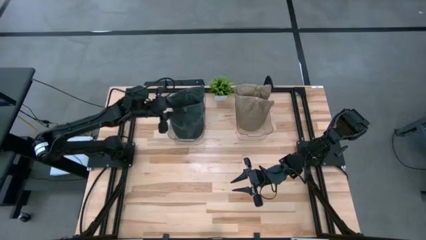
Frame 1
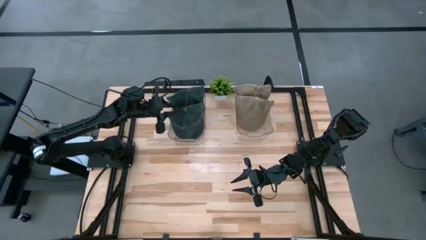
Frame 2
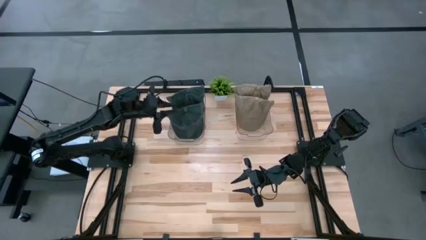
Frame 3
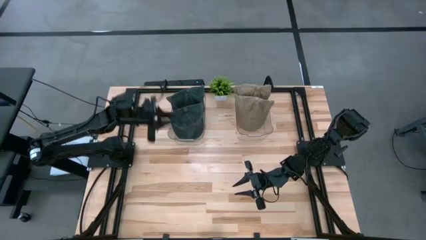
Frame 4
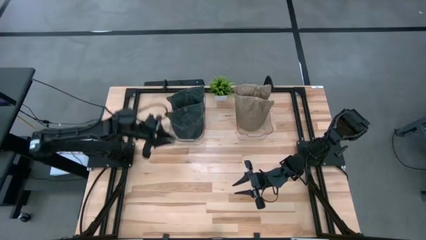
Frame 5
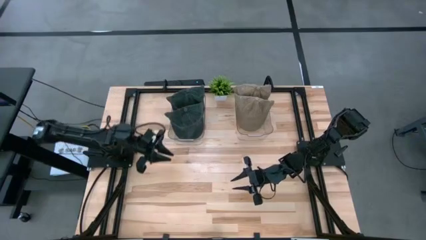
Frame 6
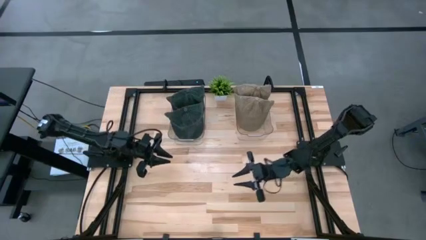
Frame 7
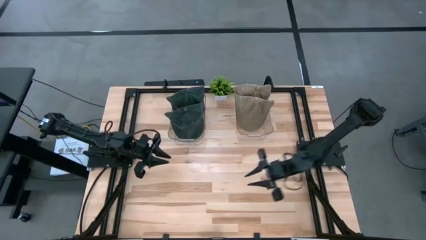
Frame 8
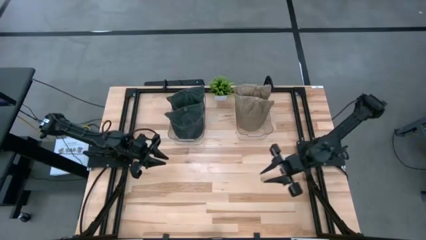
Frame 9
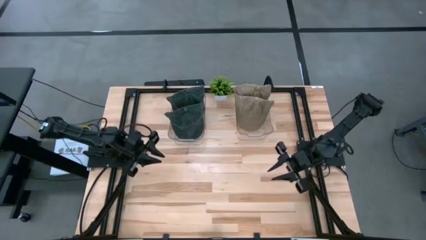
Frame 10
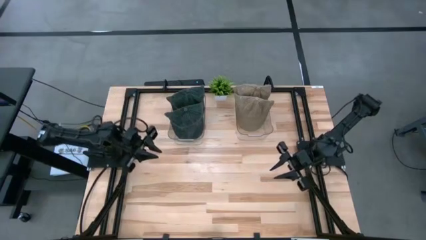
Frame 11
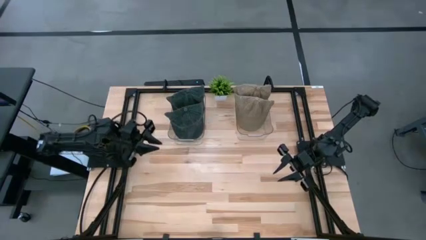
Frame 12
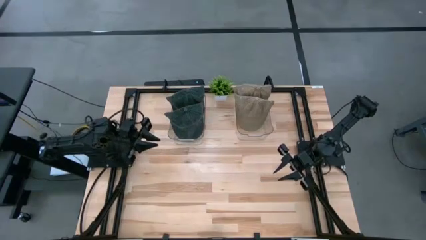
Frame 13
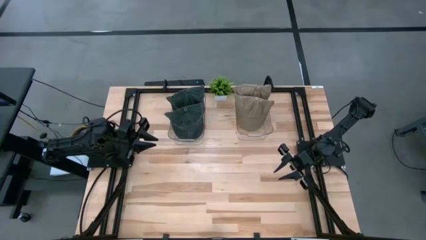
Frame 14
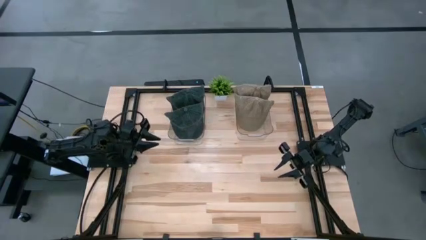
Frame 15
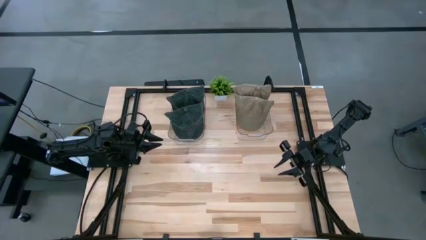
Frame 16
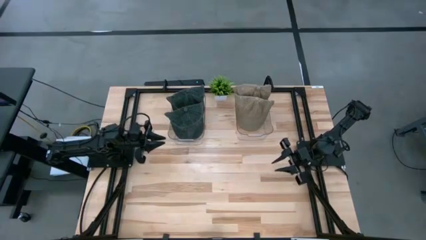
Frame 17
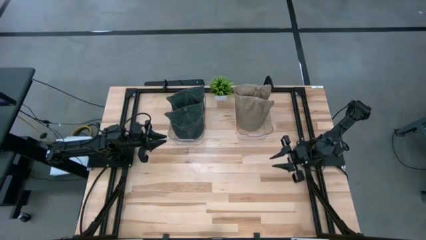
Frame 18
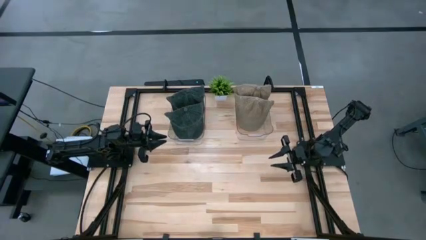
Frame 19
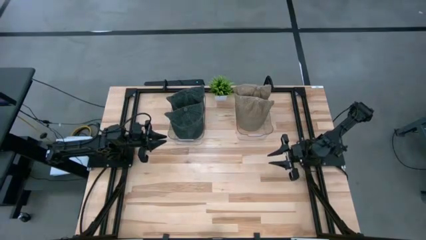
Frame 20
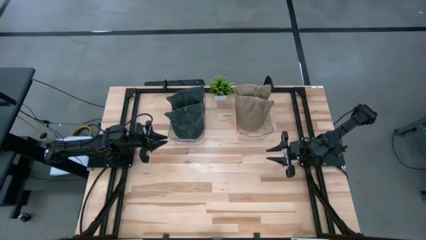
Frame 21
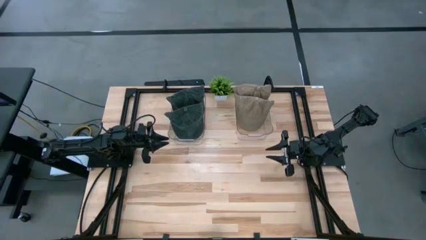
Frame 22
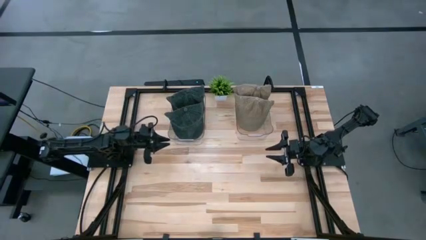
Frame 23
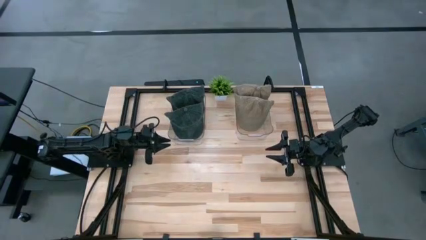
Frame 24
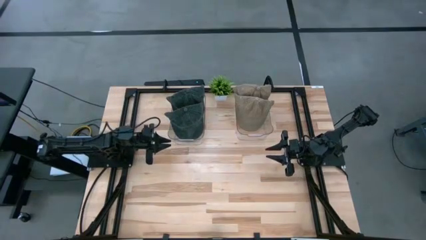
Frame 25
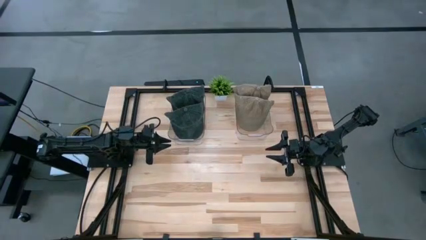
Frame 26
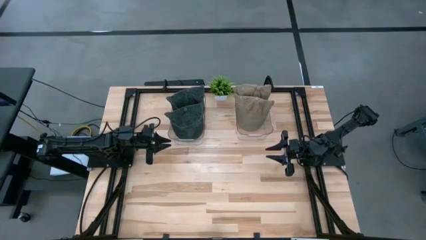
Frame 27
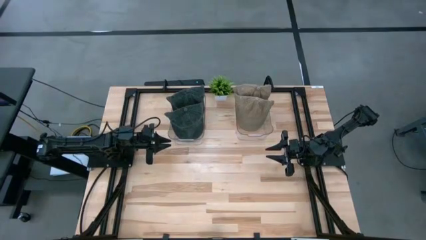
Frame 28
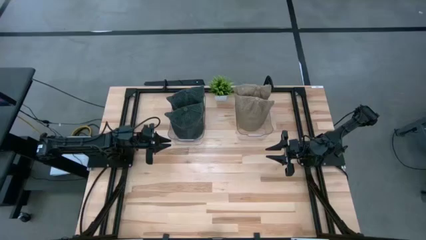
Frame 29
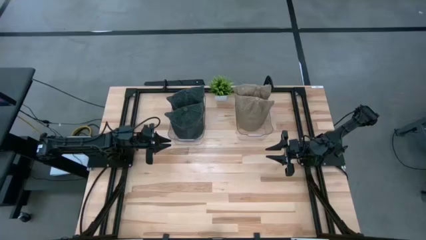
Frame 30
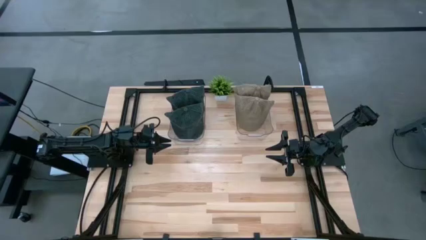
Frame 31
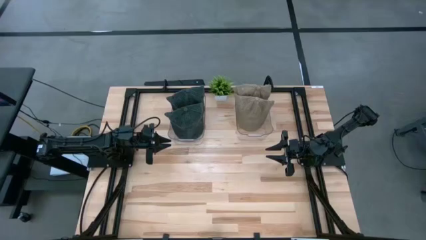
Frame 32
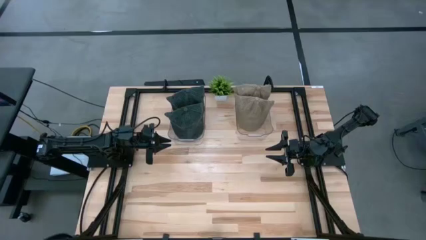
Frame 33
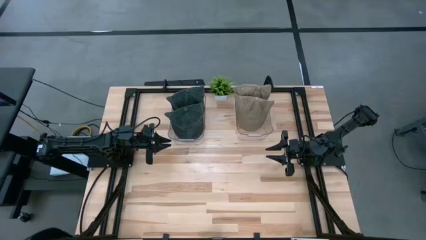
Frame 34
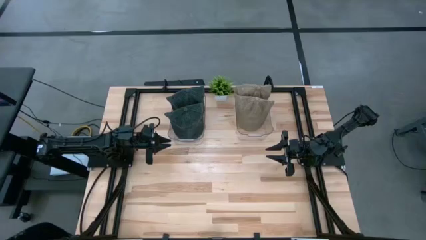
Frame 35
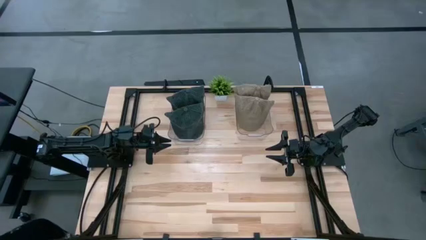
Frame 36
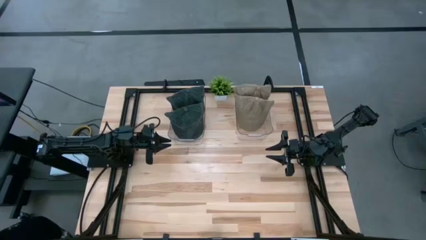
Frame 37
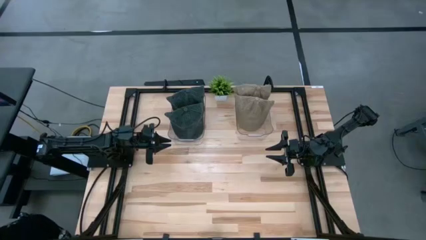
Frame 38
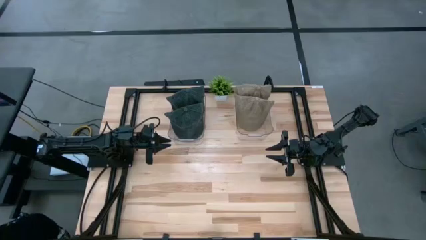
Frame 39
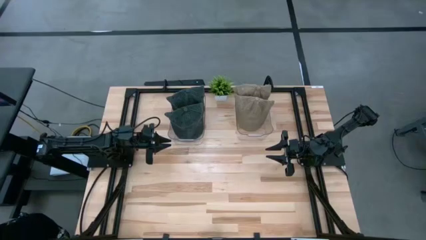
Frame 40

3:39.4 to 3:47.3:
Task: Pick & Place hat
Return to Home Position

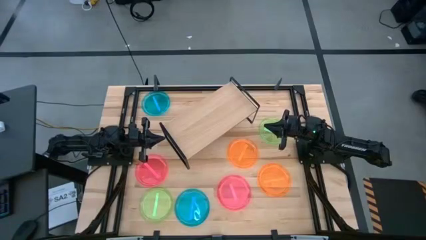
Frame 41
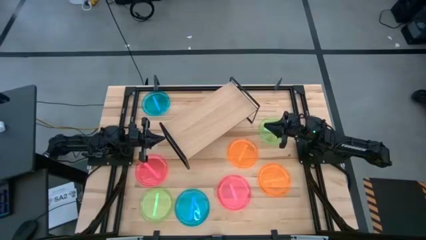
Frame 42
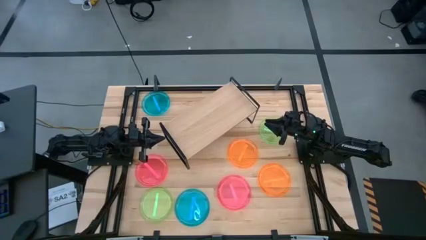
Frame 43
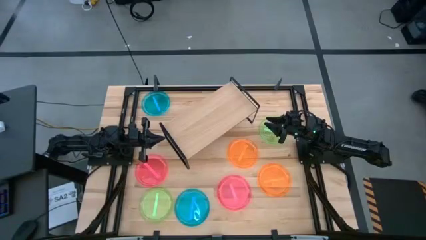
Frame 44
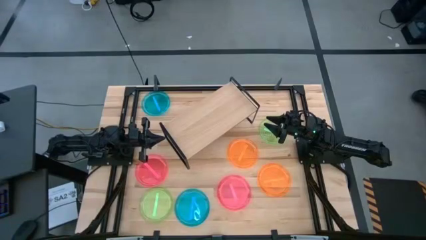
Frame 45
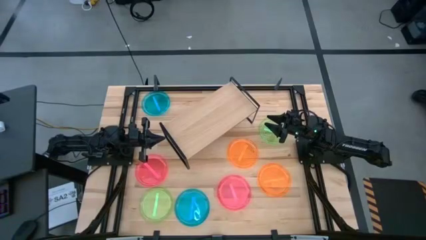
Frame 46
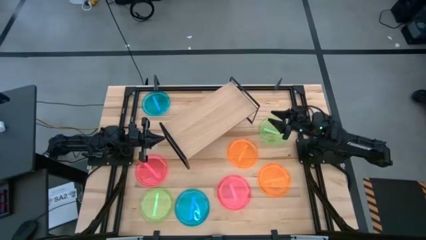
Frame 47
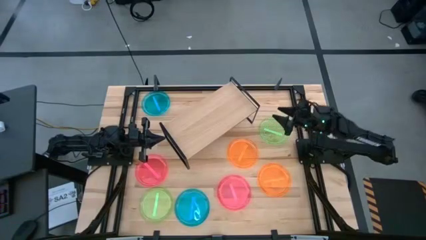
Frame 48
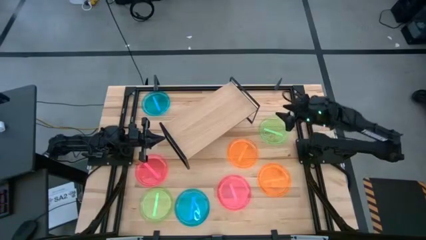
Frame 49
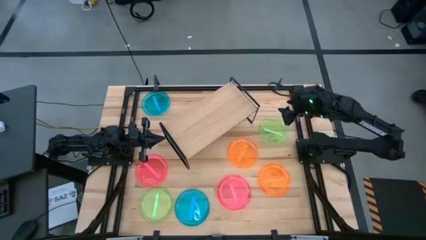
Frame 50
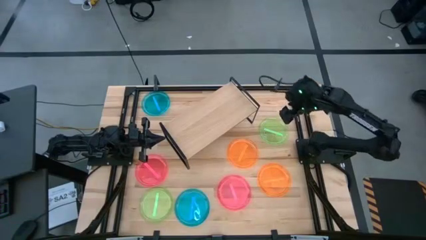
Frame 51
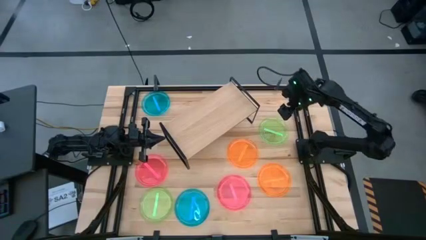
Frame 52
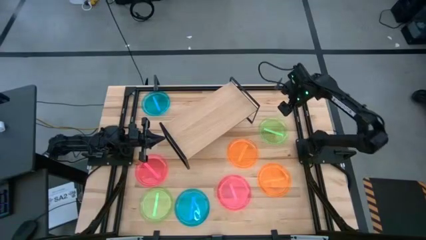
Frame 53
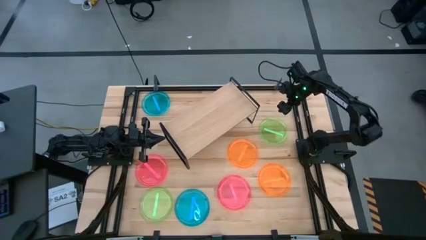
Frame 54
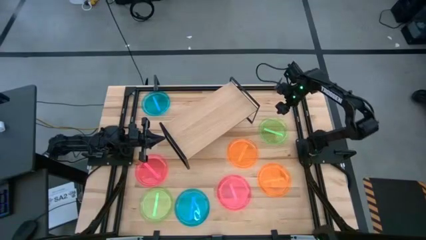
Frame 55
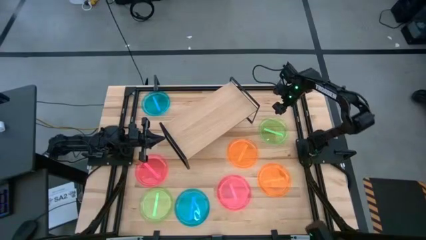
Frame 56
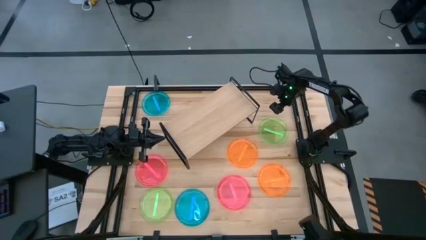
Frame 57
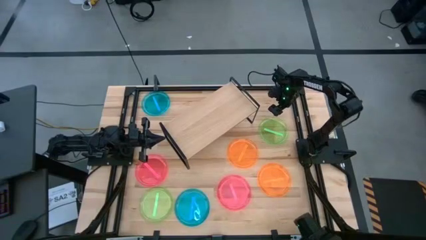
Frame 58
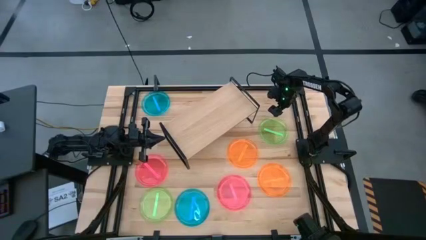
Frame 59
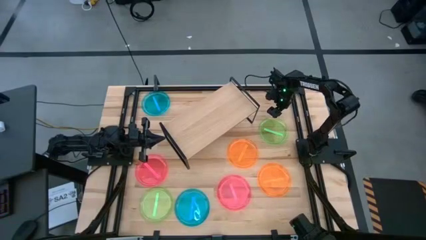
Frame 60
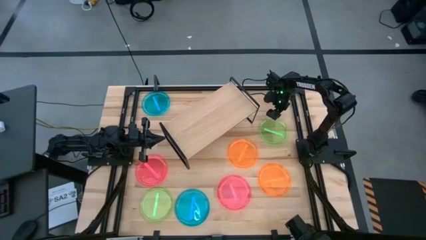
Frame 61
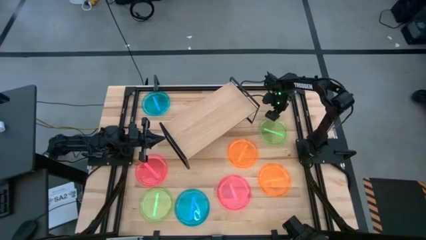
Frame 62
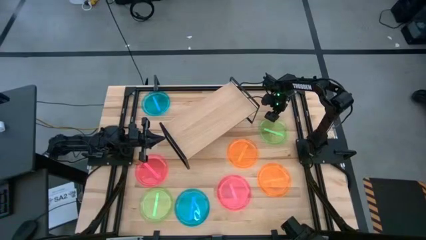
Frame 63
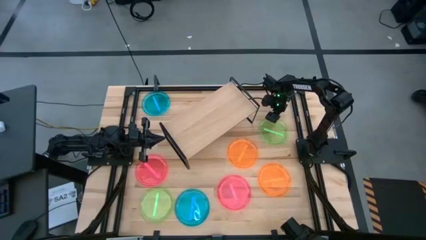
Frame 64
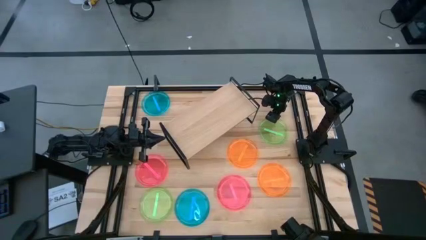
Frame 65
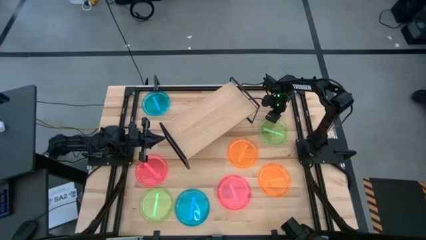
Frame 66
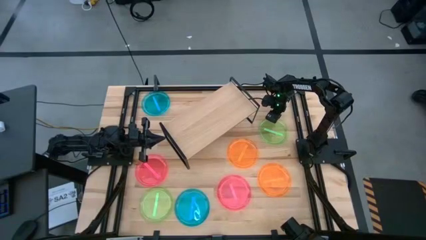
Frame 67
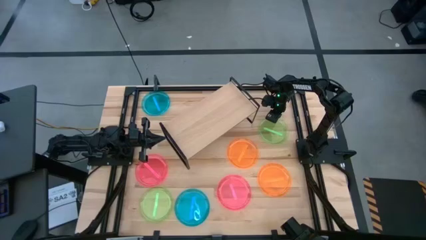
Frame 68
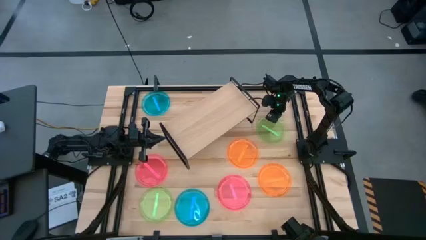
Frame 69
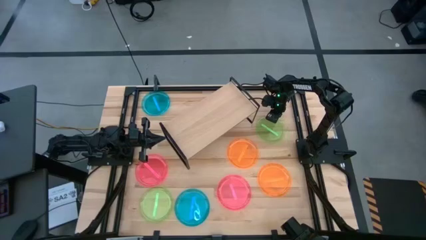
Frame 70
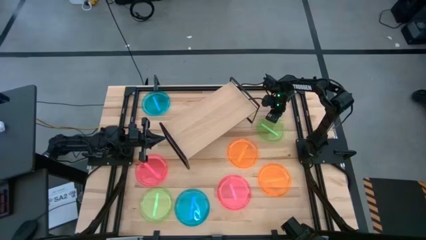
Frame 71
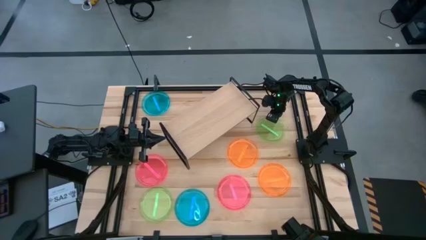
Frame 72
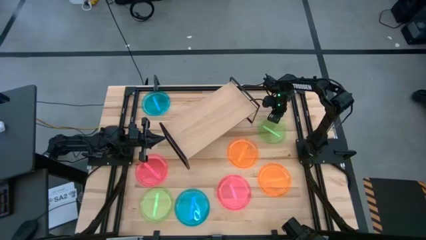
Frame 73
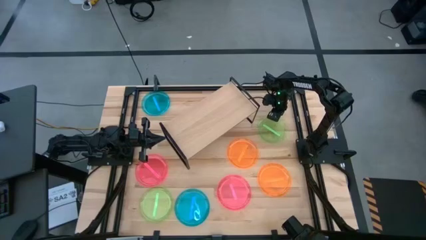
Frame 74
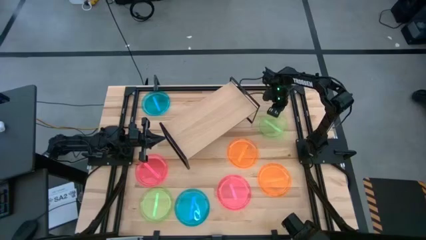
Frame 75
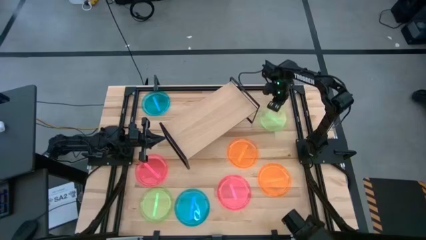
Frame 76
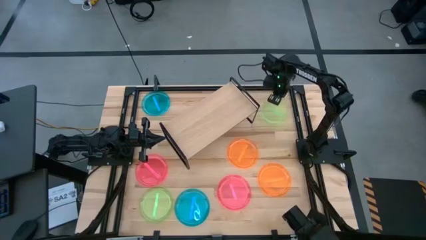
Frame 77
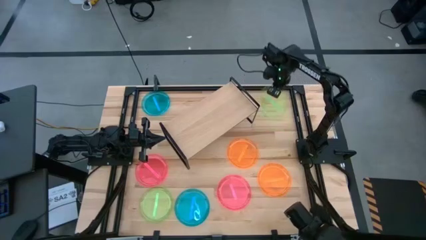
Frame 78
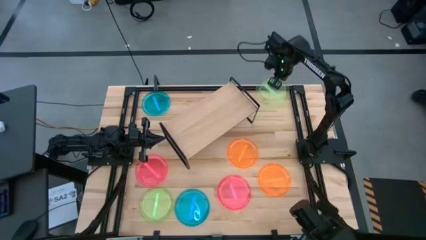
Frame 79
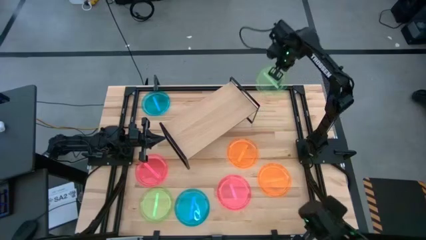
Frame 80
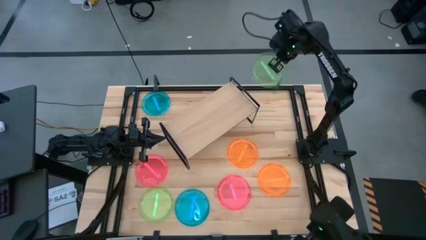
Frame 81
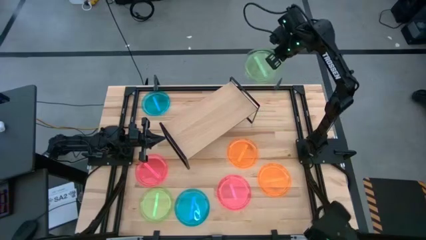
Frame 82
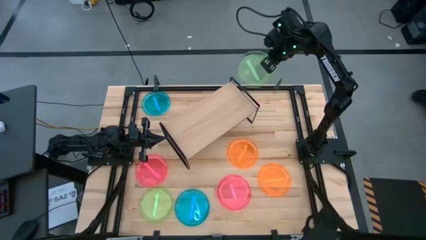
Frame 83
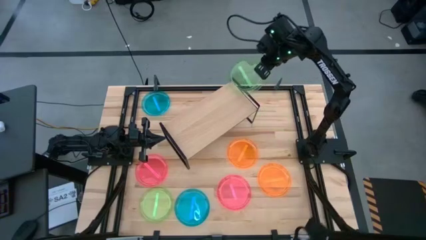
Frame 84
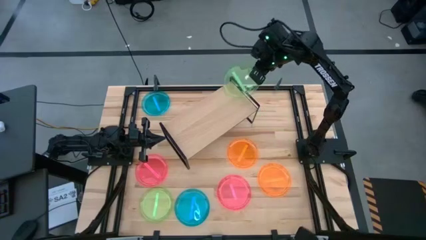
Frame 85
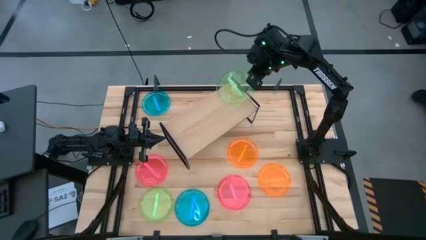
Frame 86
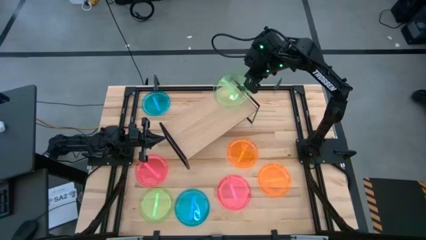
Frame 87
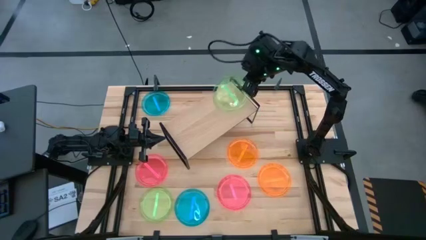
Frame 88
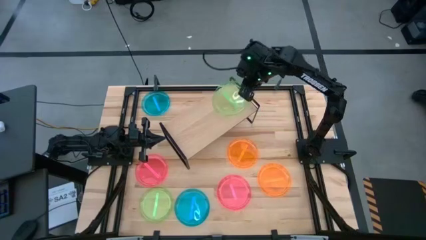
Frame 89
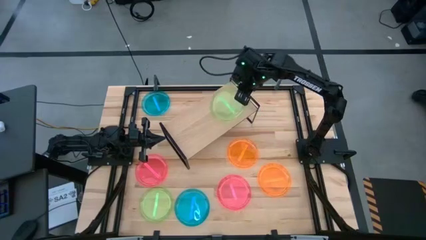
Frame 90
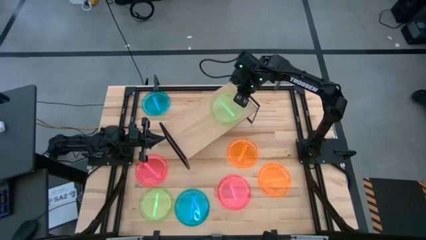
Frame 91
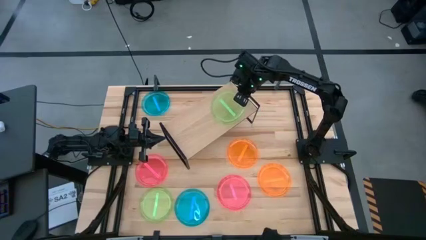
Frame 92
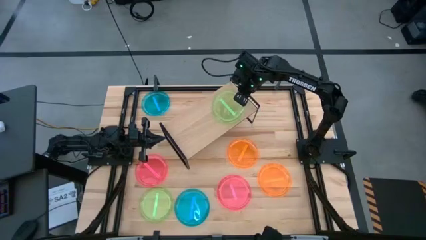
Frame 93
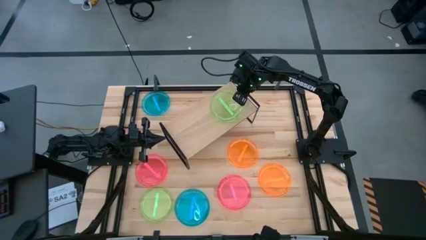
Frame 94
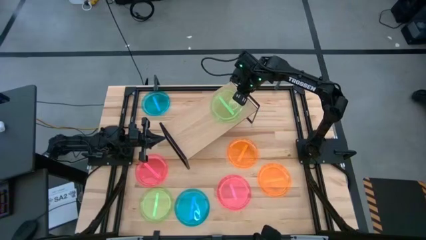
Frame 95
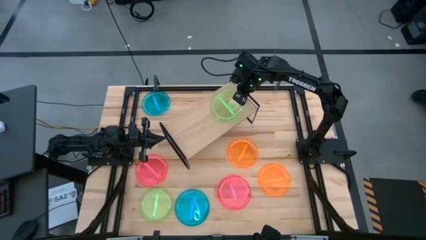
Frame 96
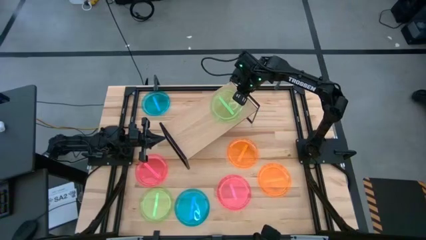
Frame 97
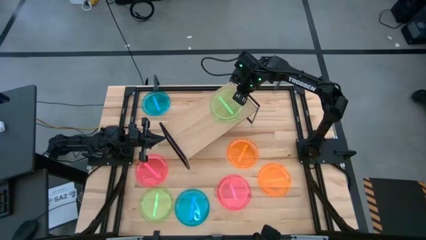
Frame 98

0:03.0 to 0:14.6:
Task: Place and stack plates onto a shelf
Put the right green plate on the shelf
